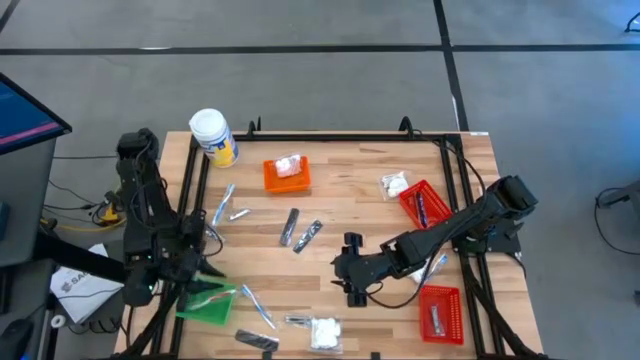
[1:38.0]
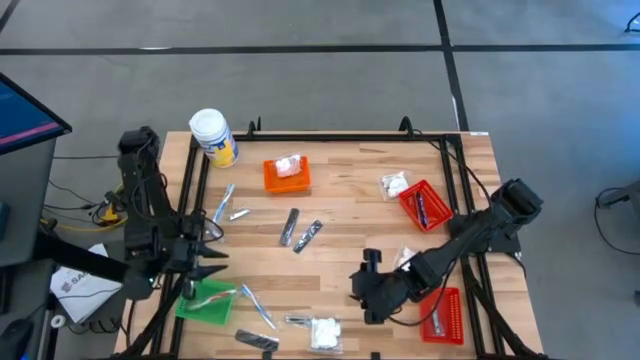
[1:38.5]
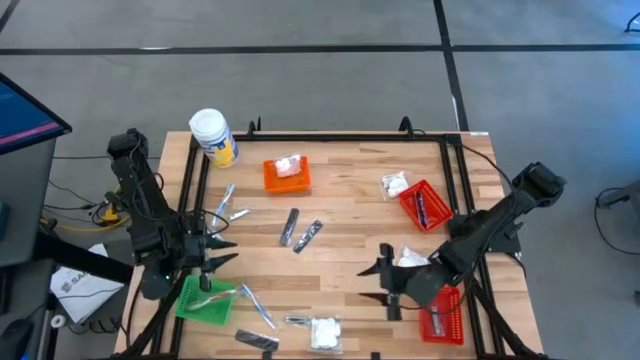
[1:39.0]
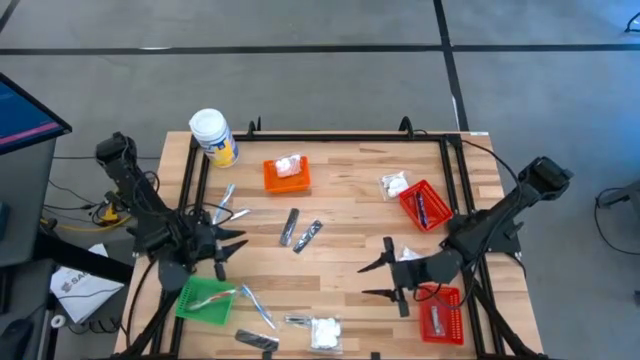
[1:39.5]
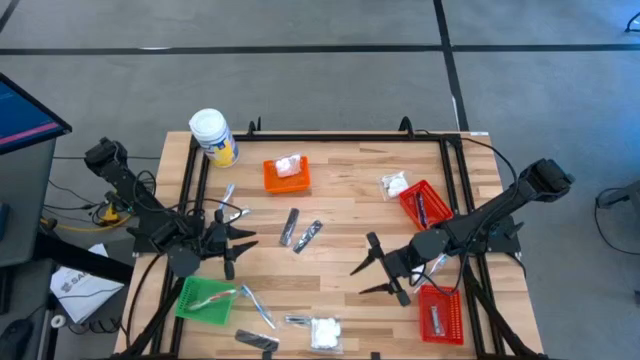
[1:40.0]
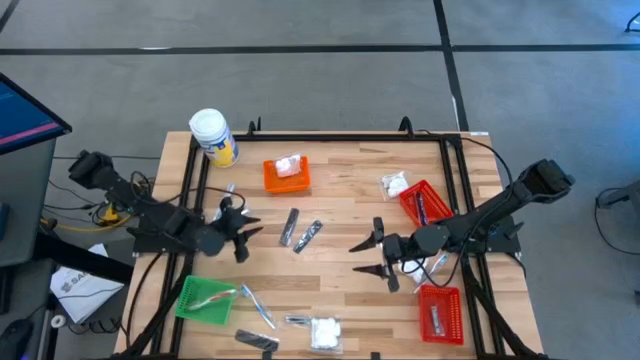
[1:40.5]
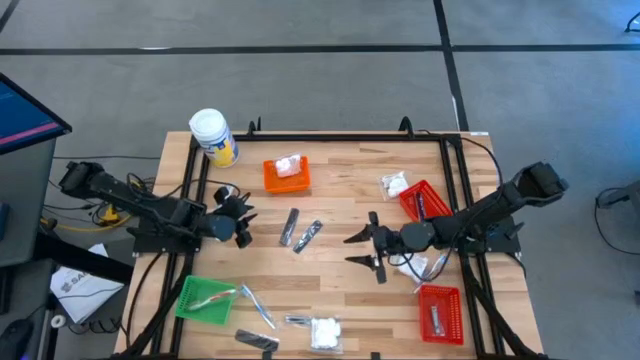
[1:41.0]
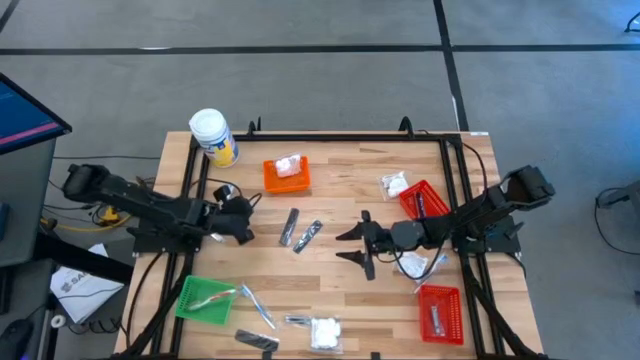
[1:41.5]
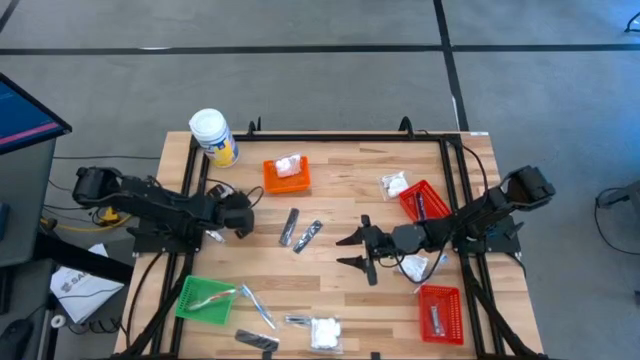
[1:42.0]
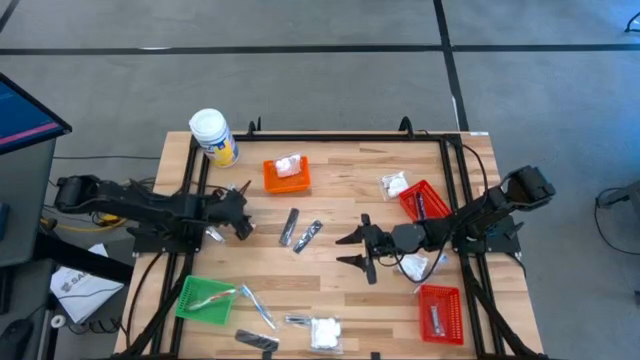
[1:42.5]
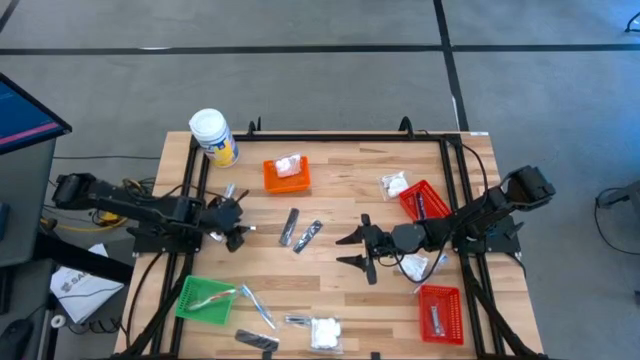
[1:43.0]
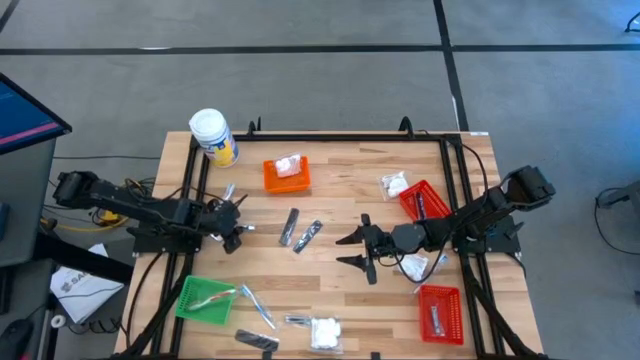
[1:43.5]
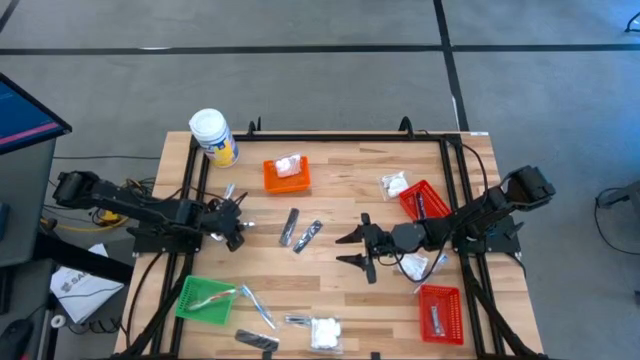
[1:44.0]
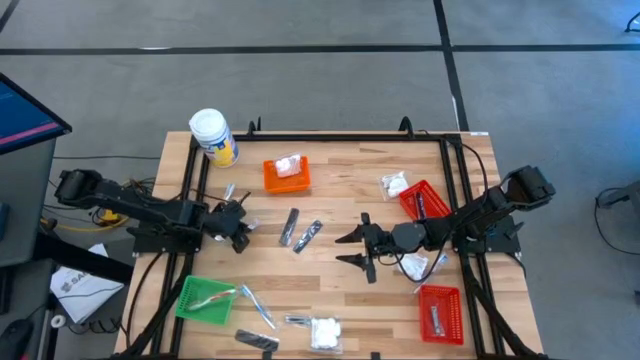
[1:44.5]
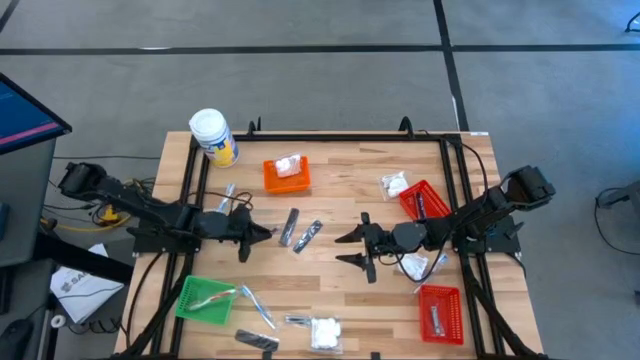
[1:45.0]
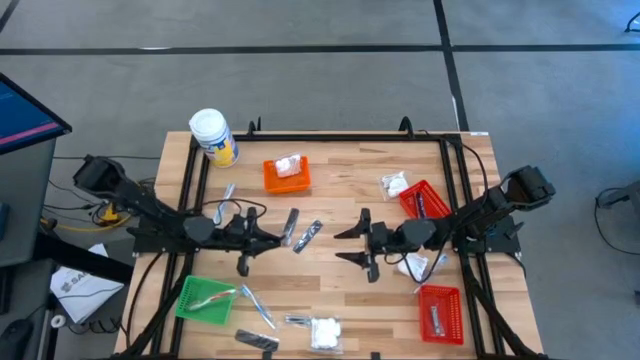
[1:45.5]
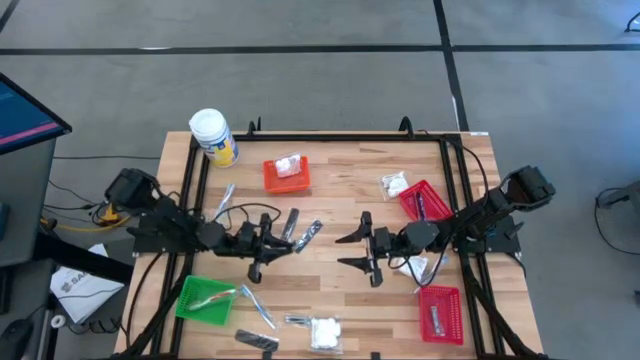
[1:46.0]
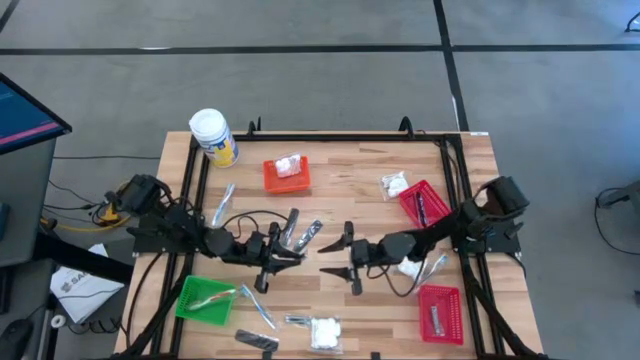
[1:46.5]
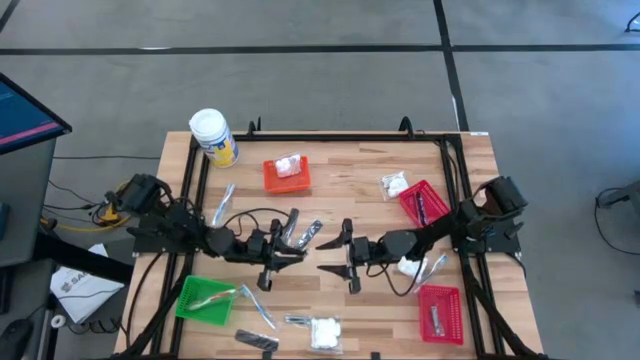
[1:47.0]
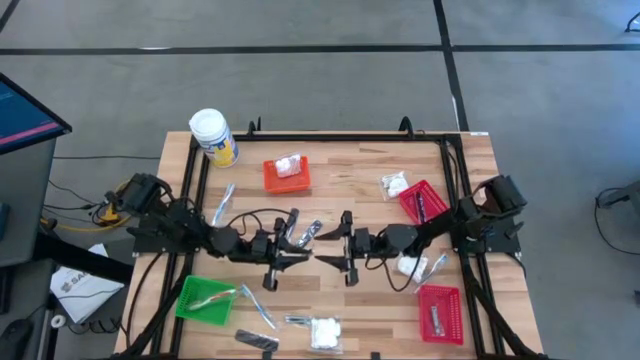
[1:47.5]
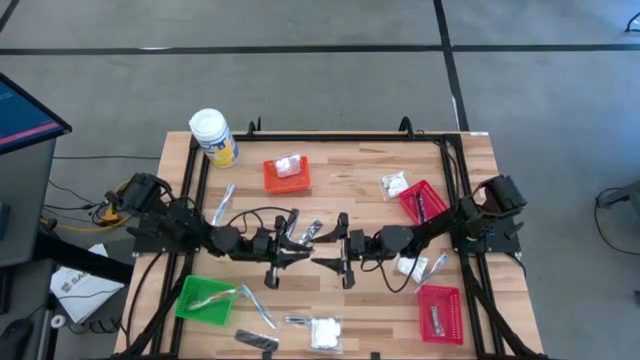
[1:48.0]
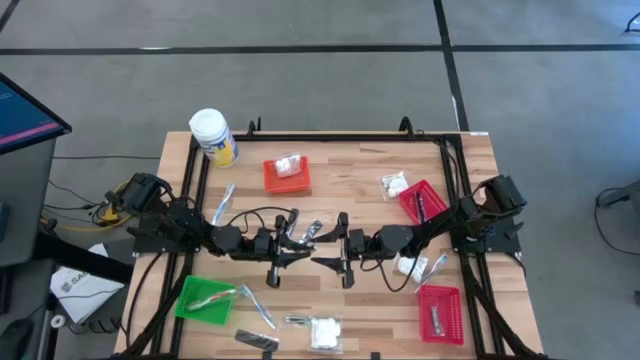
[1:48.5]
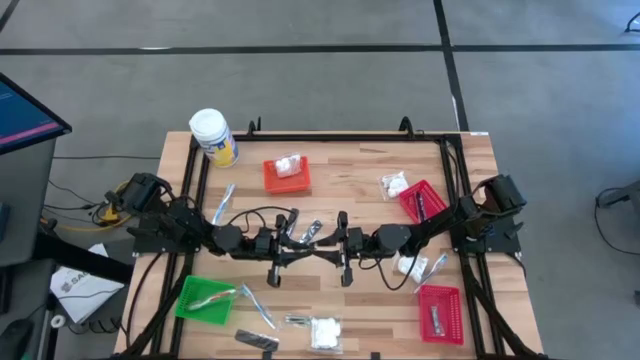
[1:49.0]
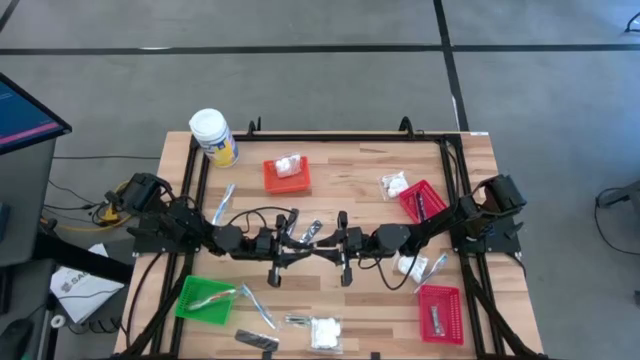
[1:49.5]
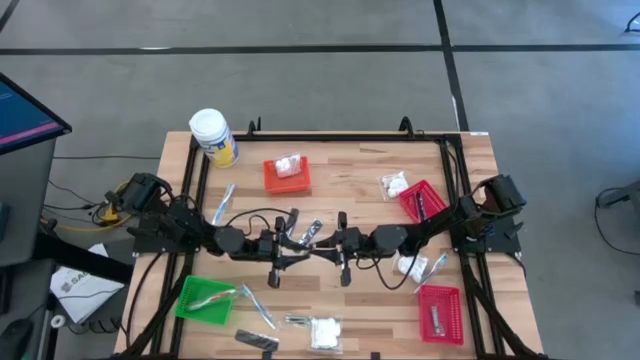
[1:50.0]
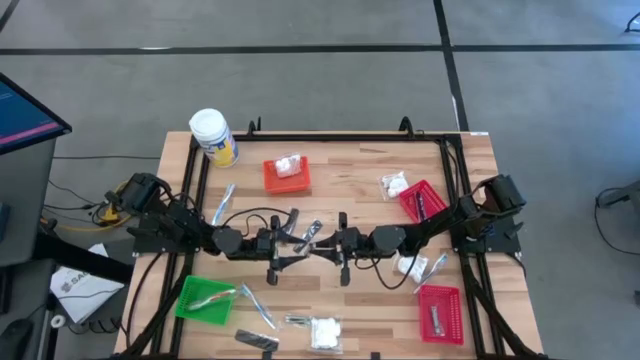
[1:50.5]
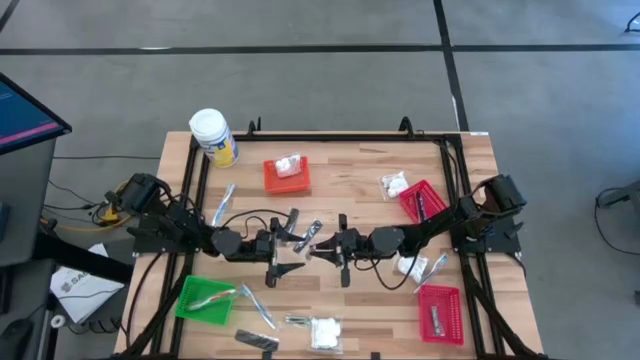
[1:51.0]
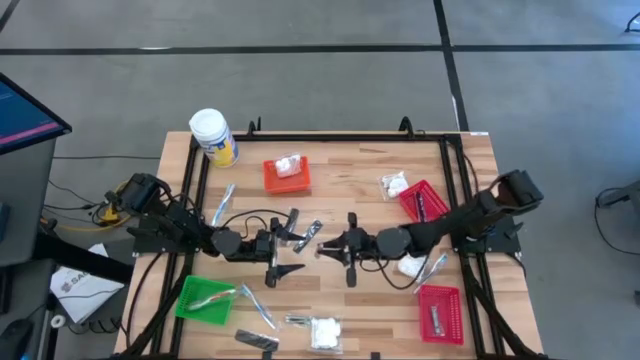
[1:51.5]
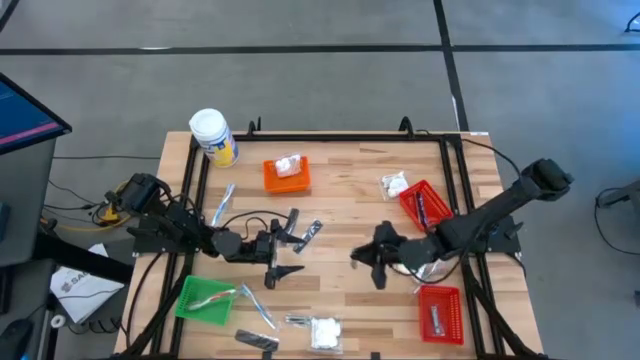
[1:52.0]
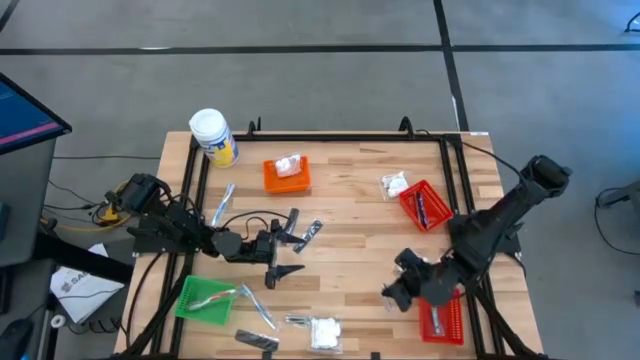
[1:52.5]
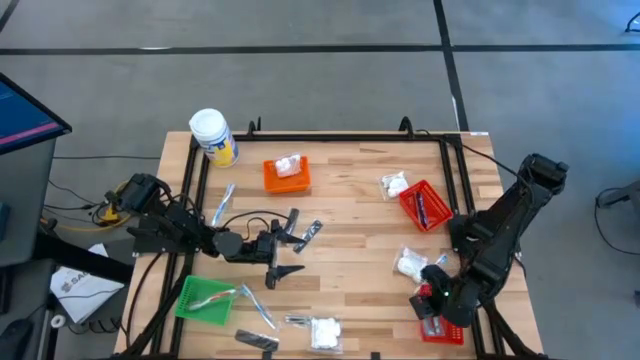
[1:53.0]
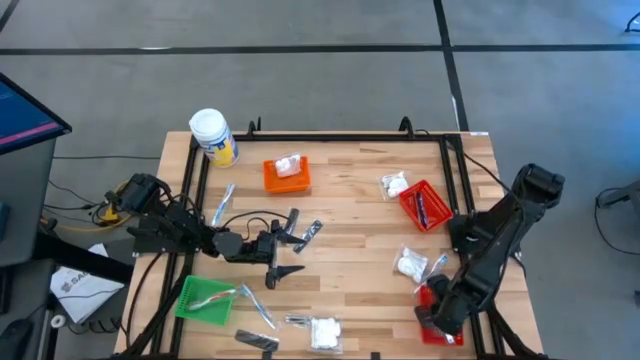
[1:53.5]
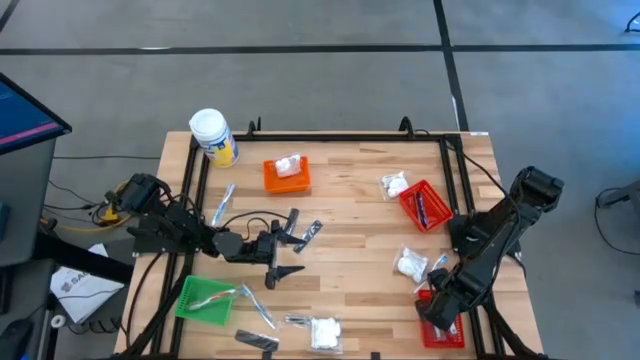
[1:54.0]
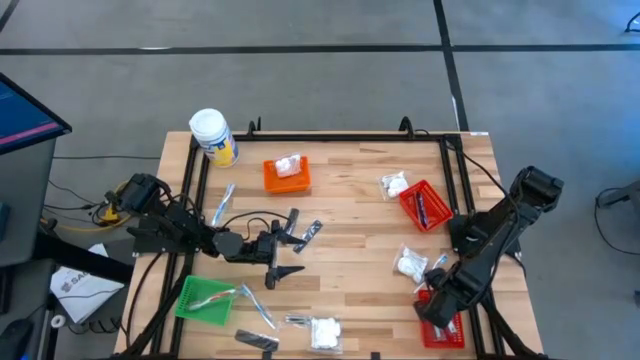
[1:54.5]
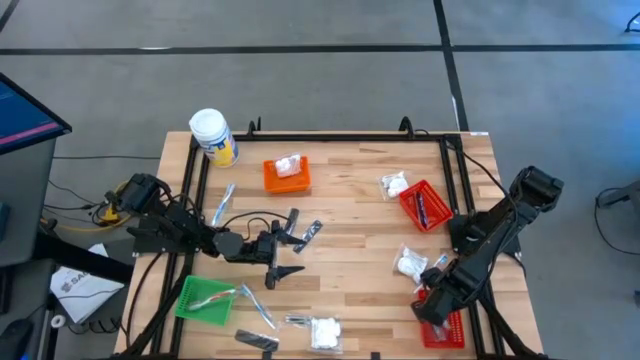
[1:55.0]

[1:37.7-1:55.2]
Task: Pick & Place Travel size toiletries
Put the silver nail cutter into the bottom red basket

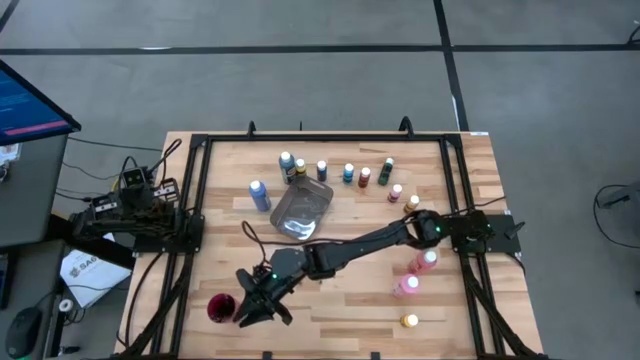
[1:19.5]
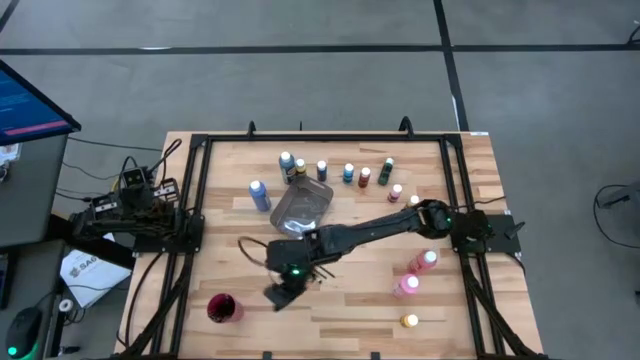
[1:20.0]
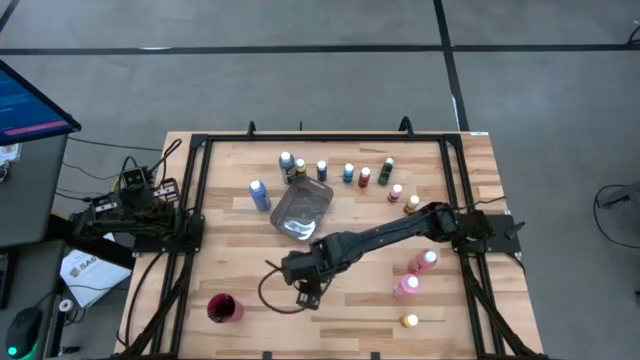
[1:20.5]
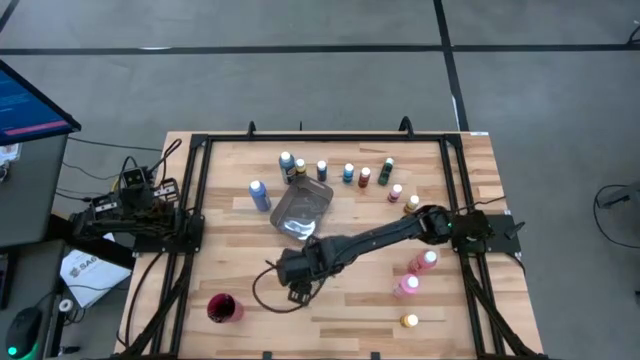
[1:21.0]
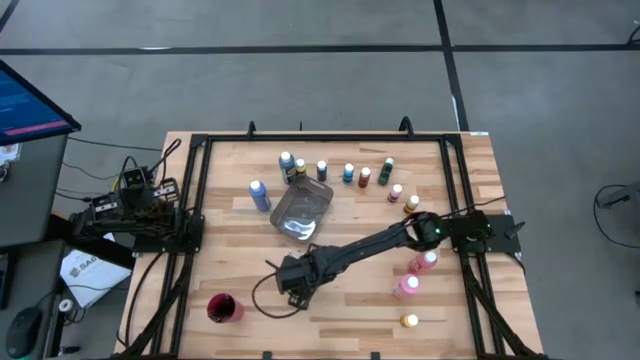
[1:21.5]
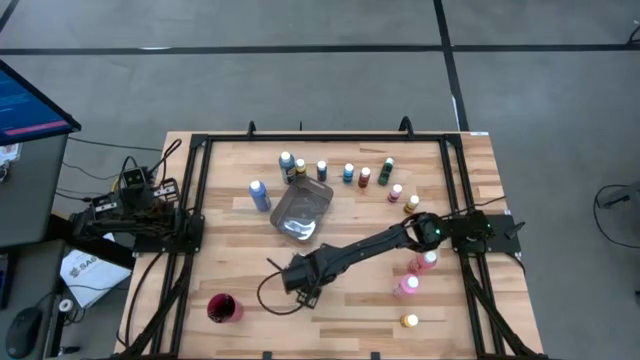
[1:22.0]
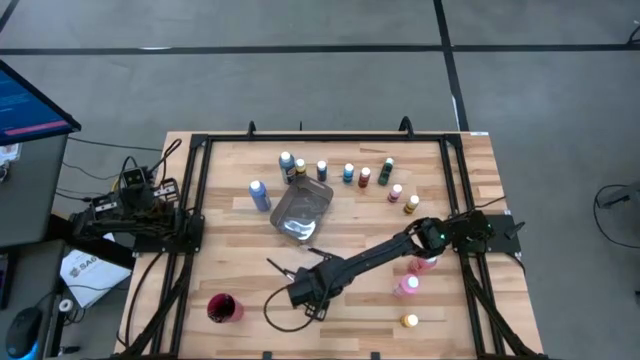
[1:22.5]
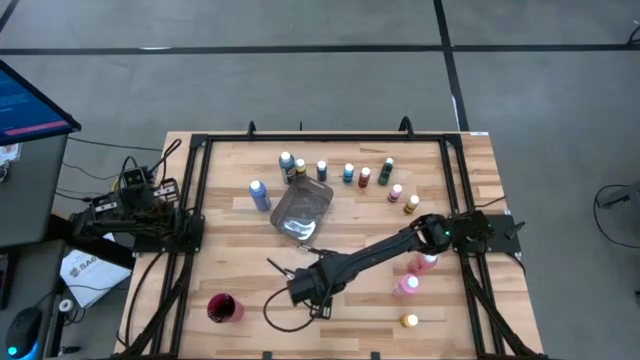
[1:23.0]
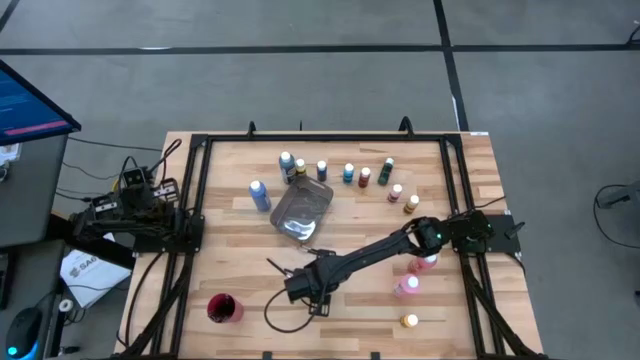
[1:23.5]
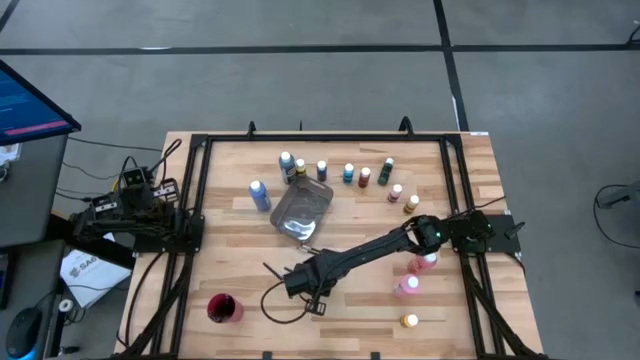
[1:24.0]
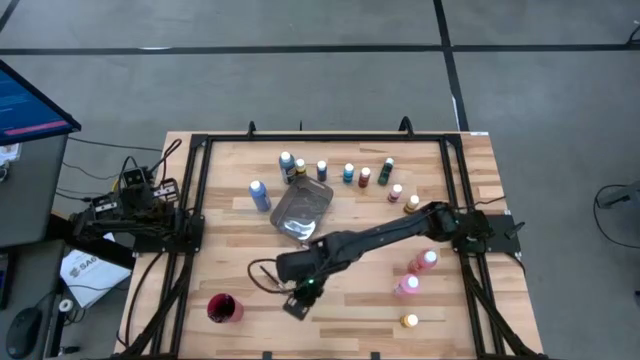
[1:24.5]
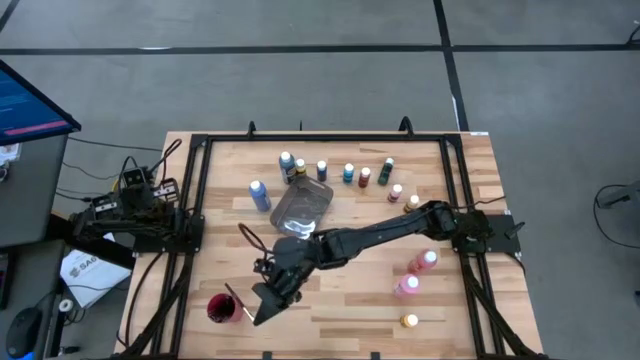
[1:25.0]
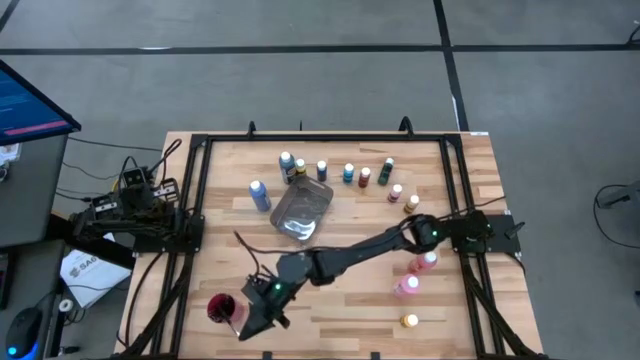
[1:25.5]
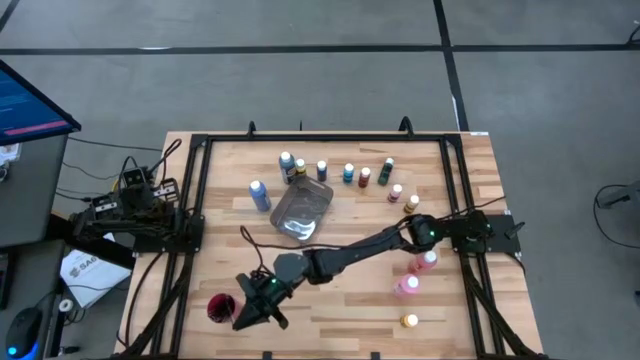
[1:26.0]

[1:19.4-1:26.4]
Task: Pick & Place Paint Supplies
Put the silver paintbrush into the red cup
